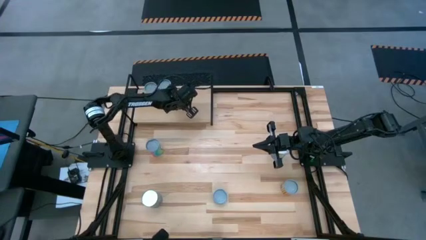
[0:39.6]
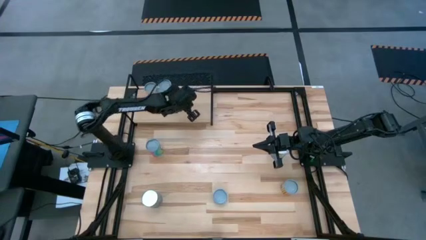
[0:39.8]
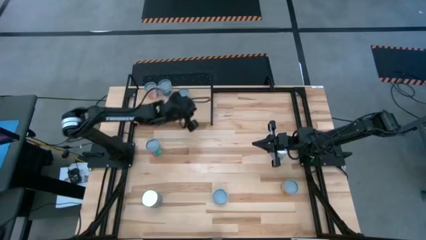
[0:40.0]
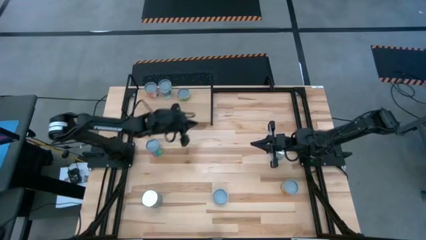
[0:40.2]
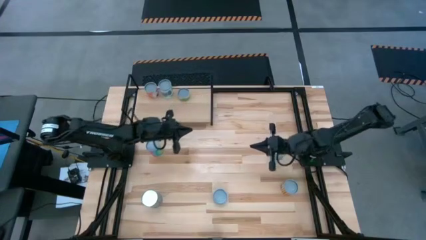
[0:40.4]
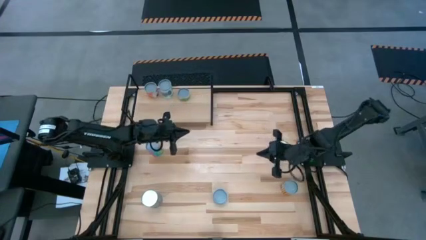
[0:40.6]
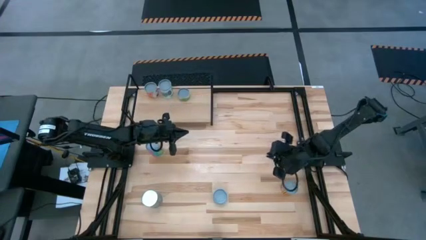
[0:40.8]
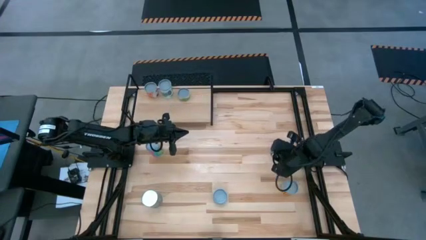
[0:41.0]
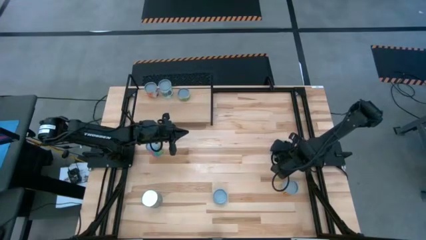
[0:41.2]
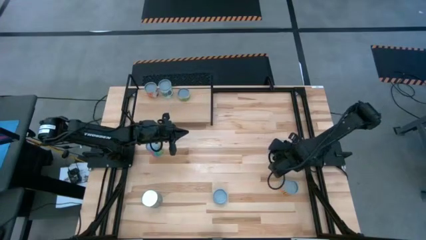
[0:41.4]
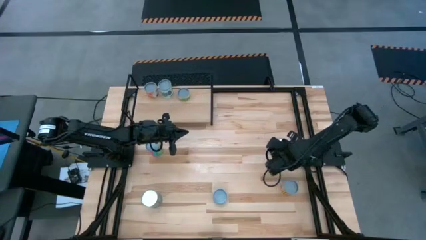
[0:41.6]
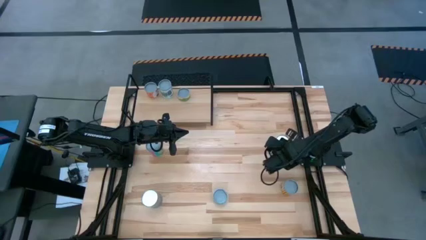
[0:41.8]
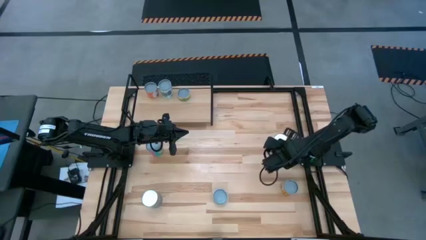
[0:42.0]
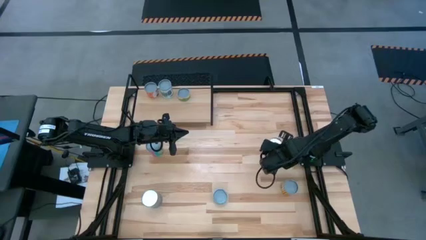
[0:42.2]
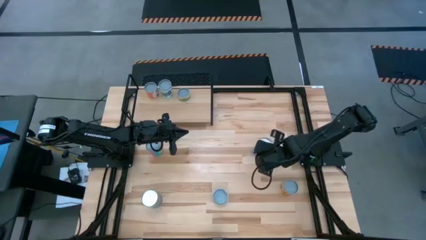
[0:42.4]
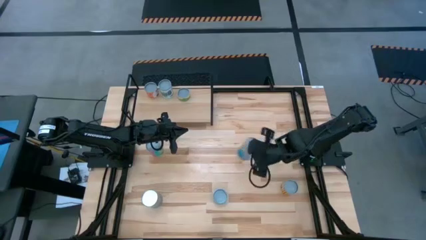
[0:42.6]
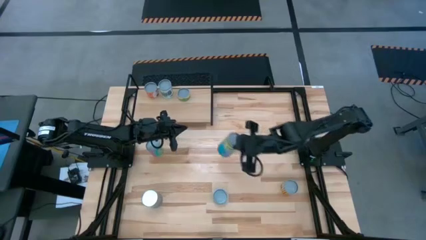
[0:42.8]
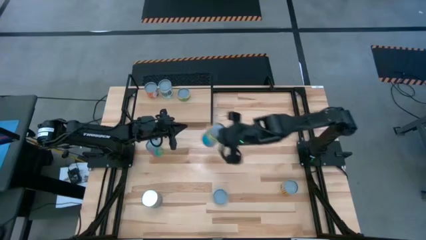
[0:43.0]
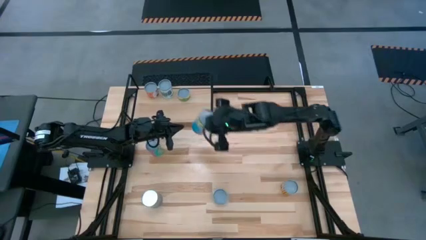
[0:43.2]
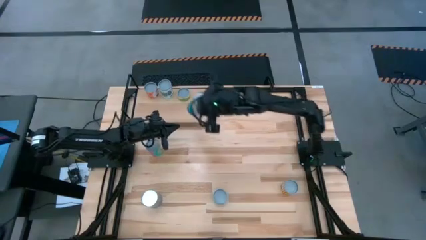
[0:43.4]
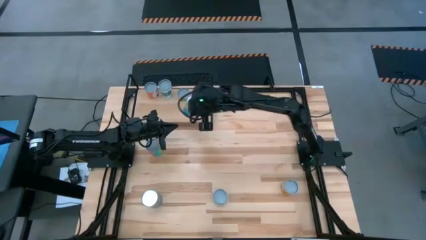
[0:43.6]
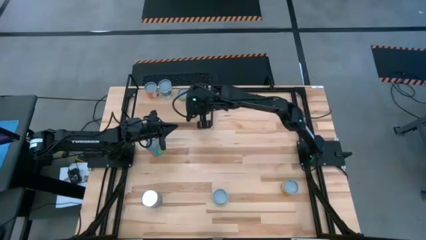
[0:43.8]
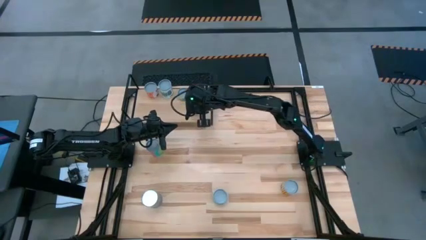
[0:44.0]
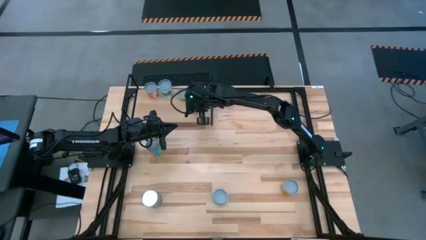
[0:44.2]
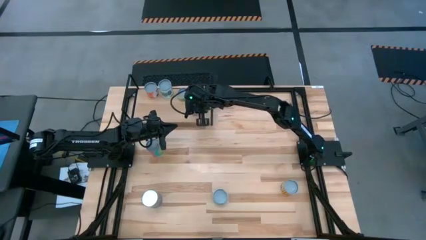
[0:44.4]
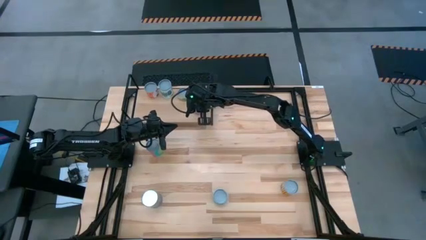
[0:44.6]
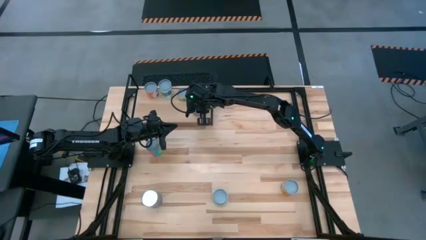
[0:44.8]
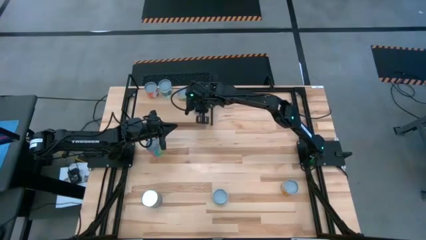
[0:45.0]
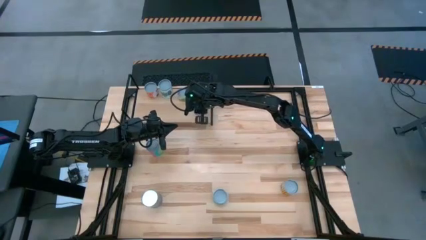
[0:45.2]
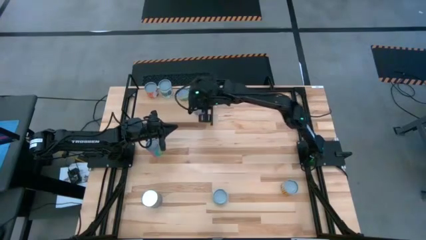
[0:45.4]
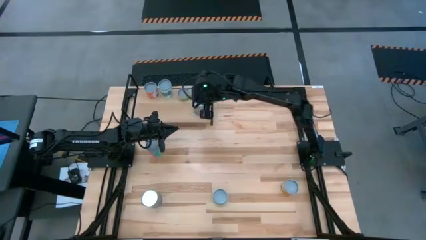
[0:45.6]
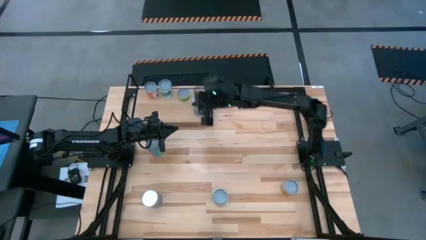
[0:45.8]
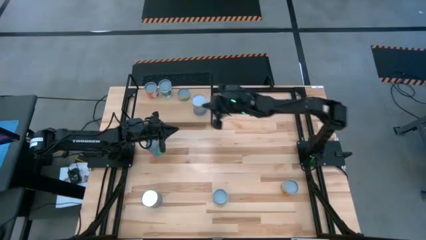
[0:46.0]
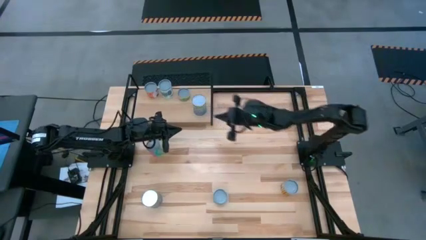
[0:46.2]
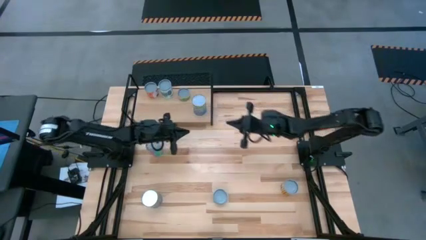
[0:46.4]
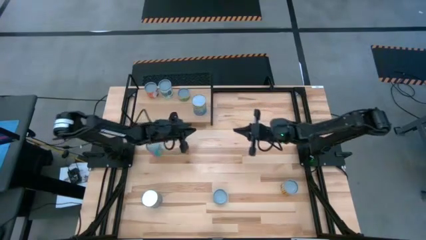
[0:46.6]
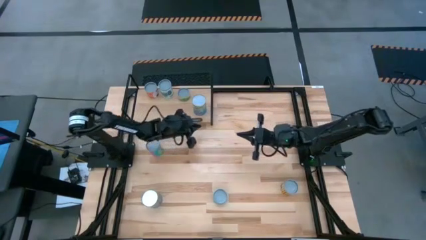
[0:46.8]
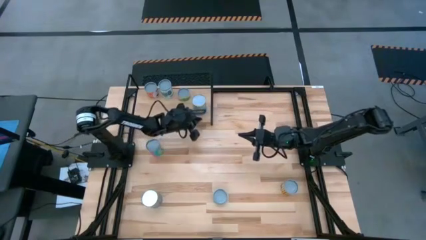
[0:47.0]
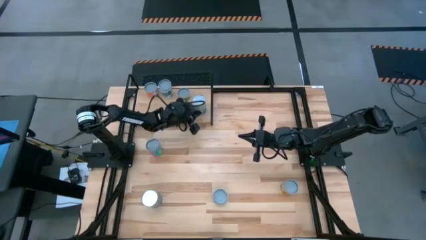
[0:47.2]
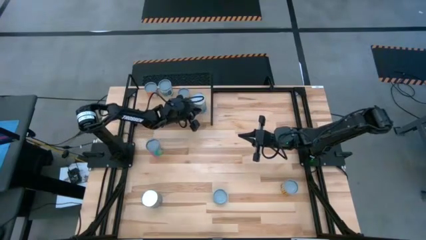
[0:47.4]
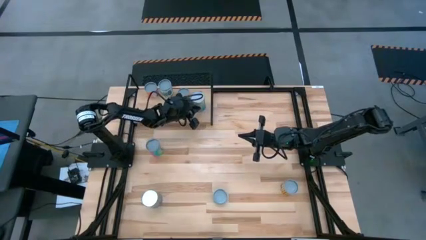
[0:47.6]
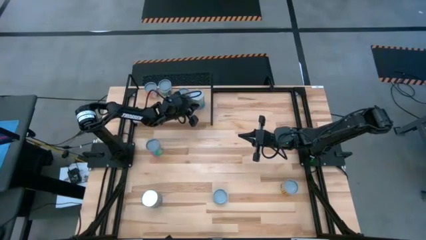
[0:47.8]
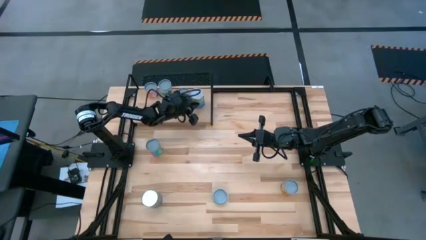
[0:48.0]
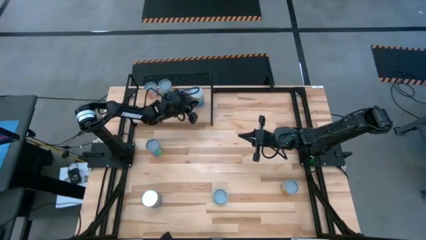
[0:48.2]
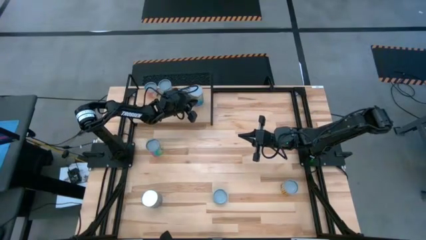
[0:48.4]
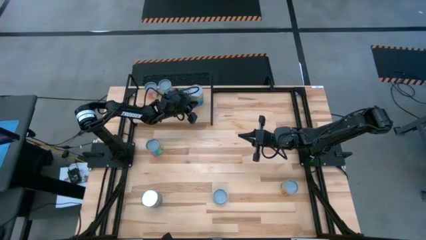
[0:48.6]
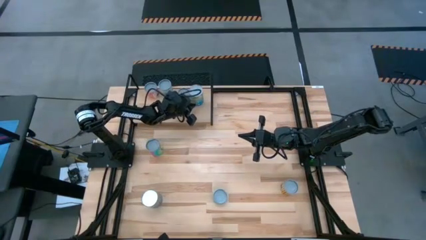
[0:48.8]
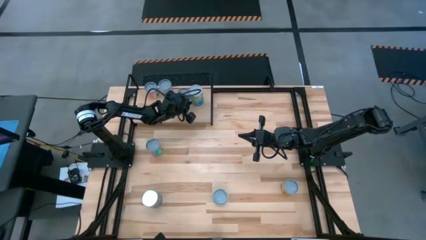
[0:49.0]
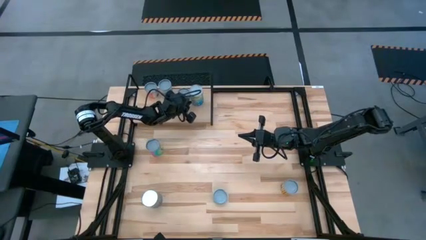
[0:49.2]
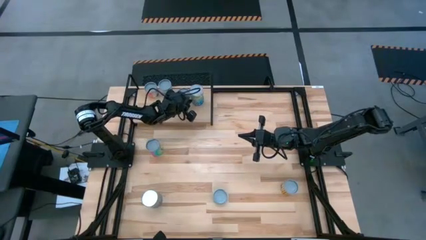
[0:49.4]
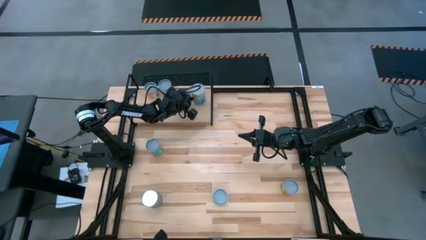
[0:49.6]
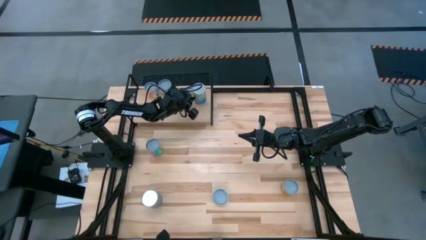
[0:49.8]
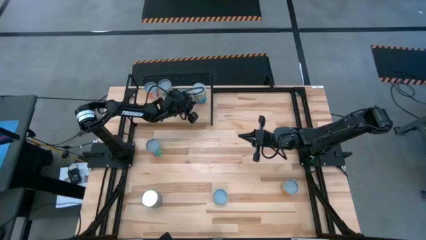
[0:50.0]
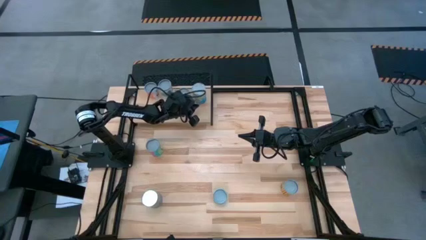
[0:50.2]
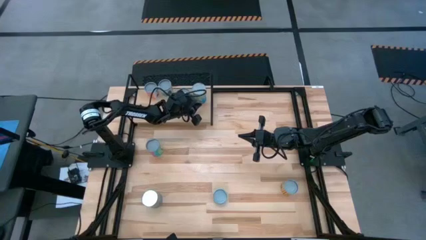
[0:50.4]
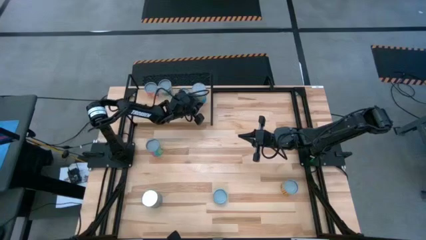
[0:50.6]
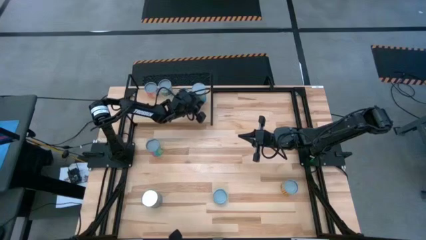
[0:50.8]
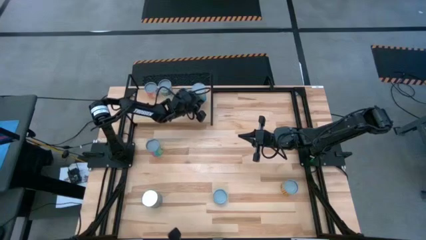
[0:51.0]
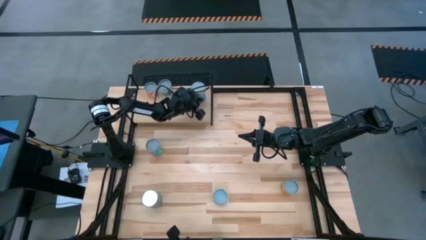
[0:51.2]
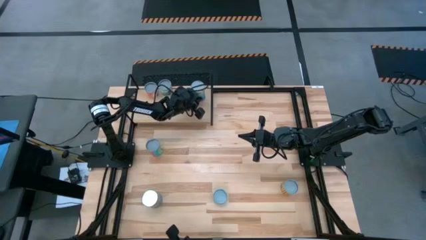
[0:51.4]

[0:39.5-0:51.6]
Task: Pick and place cans onto a shelf
Put the top canned cherries on the shelf

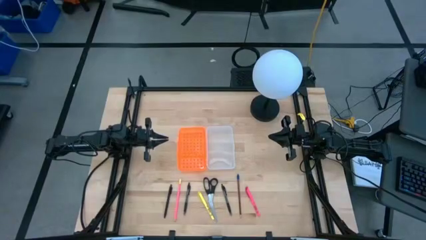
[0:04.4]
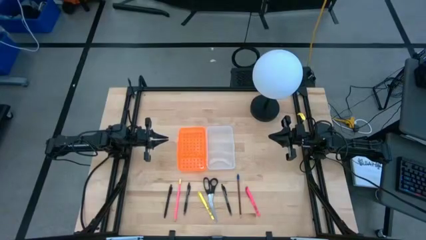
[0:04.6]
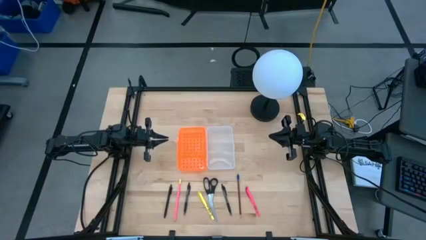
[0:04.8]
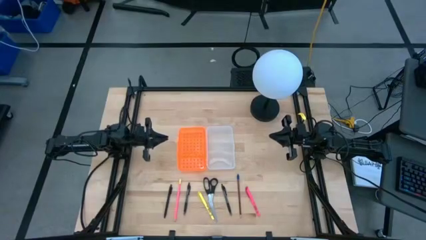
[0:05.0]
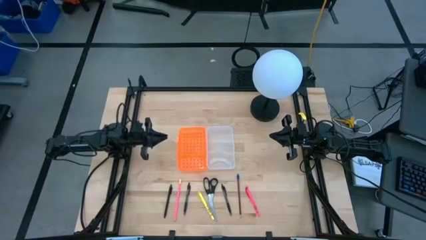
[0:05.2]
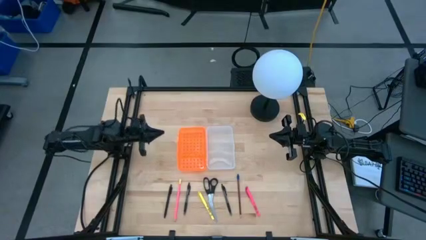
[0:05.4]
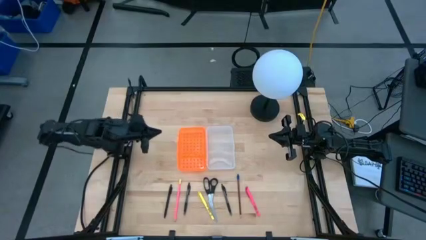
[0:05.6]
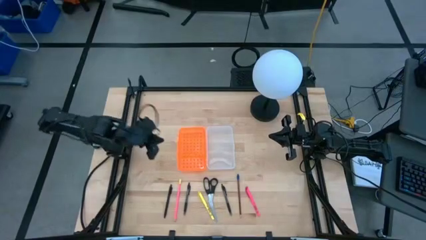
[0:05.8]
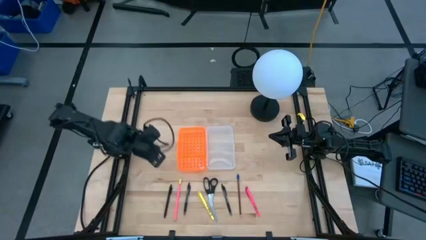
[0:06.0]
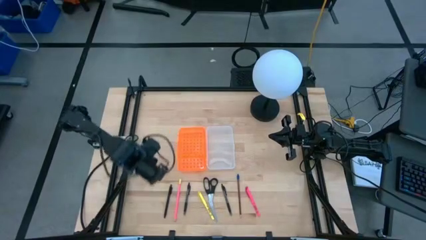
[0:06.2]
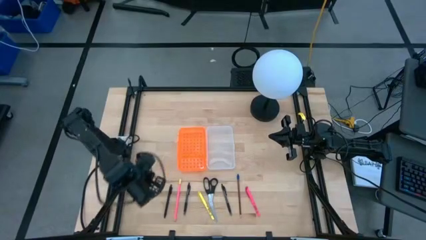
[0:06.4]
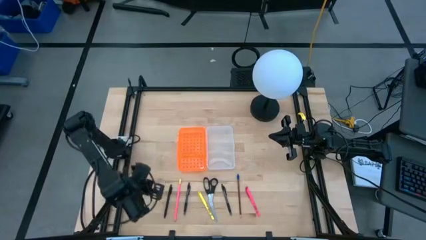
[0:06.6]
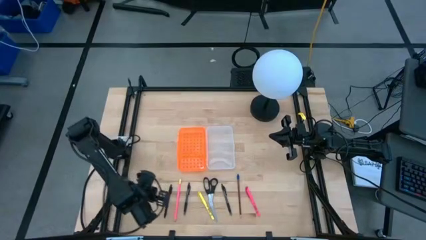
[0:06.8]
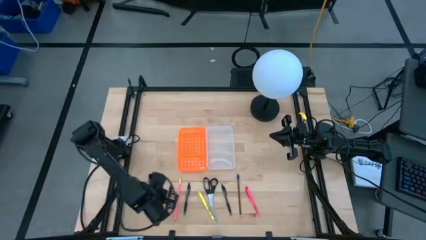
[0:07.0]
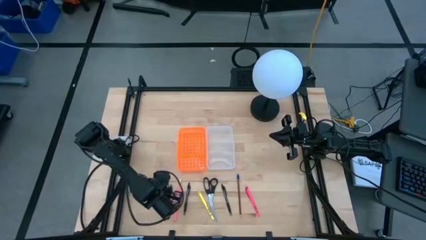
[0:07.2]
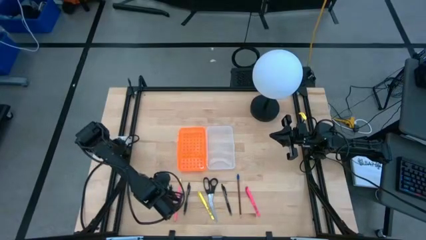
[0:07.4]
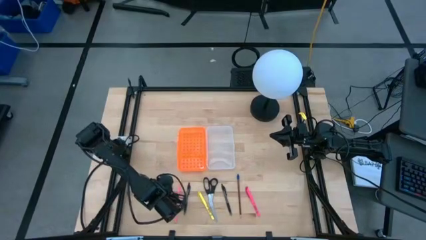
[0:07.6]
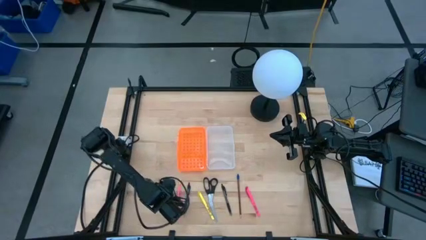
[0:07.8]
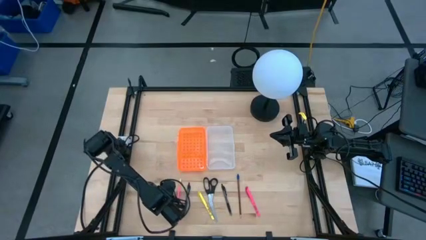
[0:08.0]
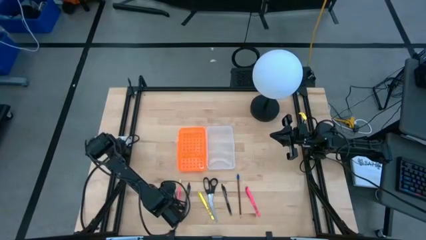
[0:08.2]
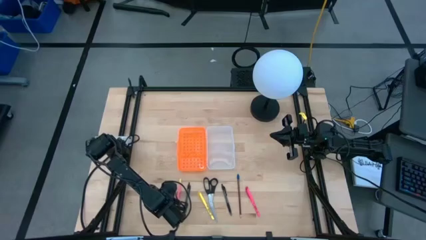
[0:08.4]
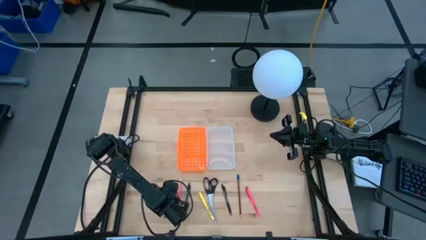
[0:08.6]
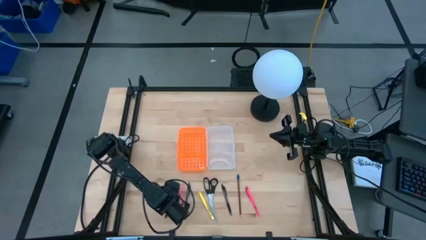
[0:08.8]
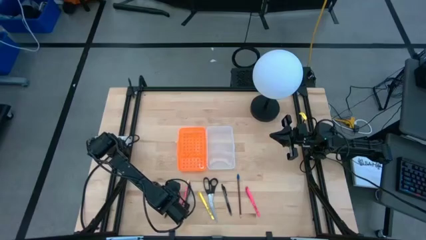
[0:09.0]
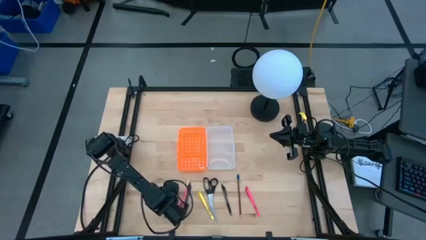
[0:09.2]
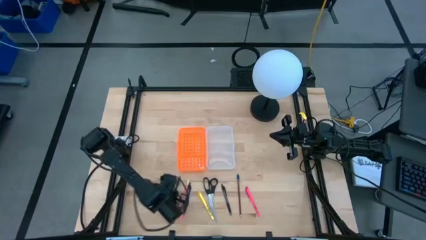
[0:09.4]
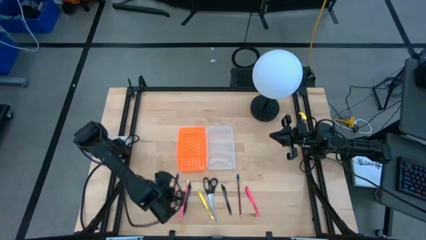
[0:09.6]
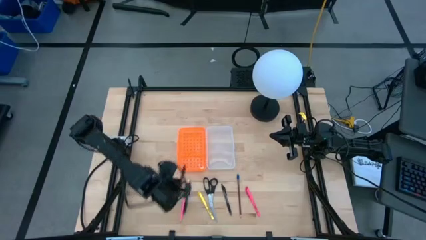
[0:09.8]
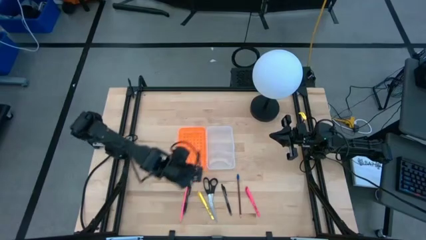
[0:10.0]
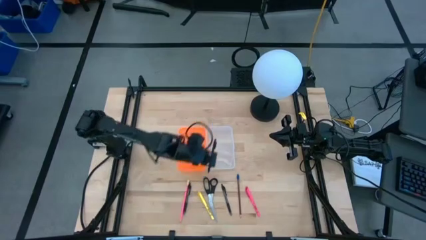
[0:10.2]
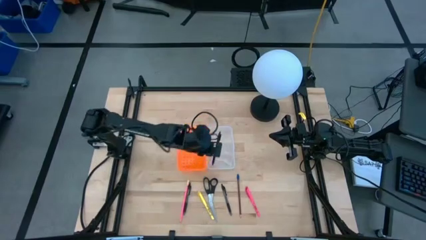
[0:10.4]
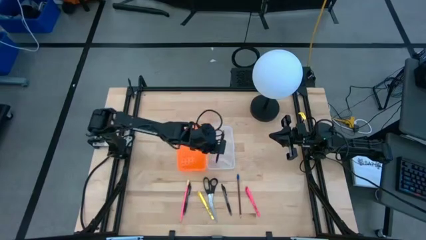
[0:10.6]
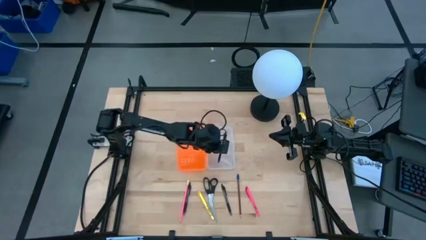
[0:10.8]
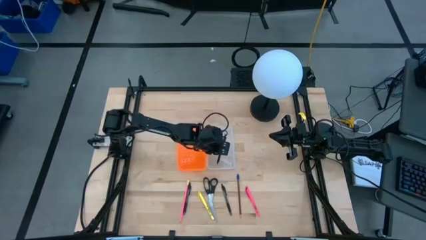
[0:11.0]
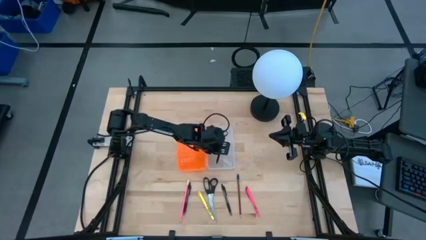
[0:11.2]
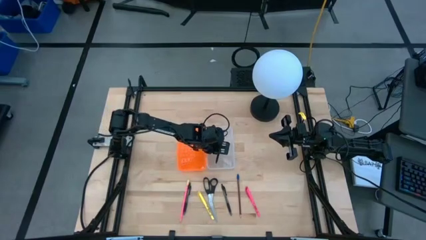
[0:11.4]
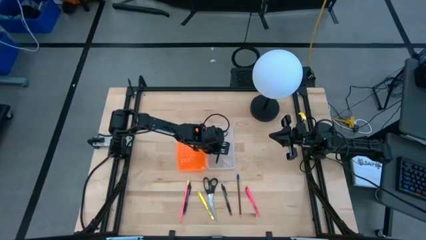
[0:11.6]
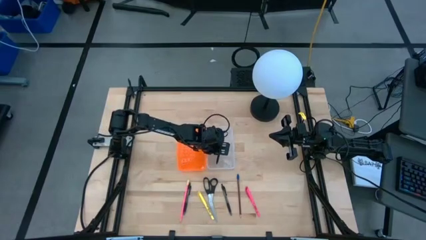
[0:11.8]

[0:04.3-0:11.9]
Task: Pick & place school supplies into a supply box
Put the black pen into the supply box
